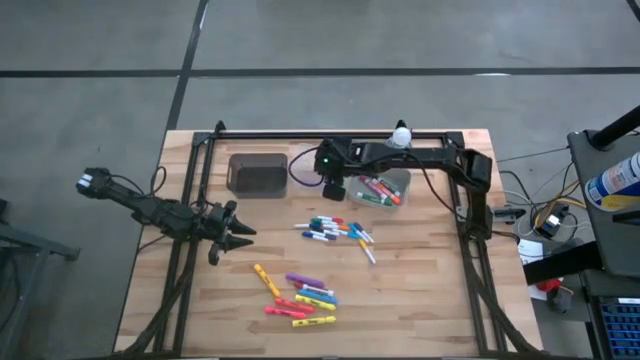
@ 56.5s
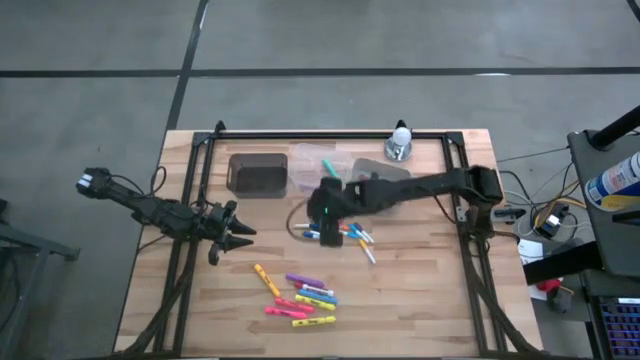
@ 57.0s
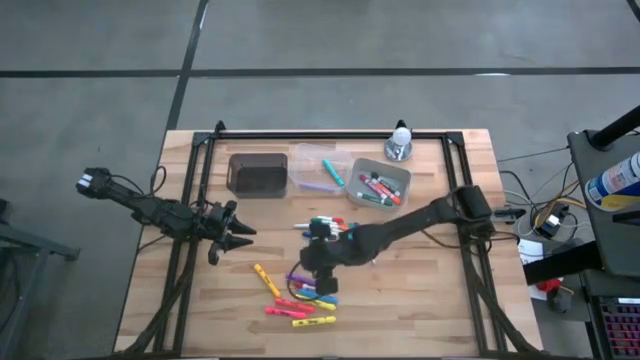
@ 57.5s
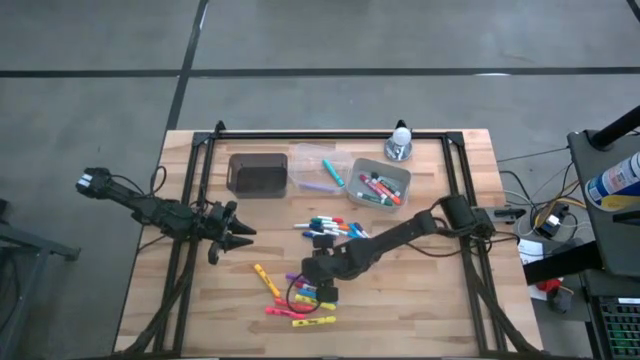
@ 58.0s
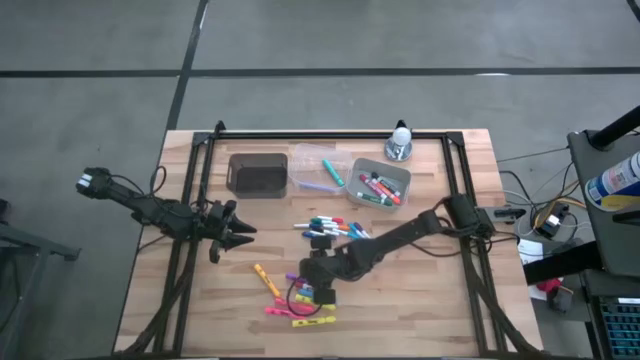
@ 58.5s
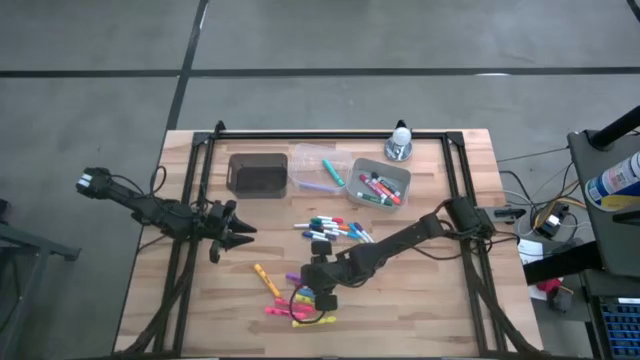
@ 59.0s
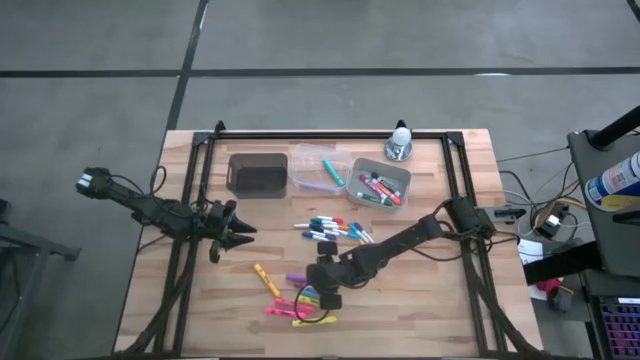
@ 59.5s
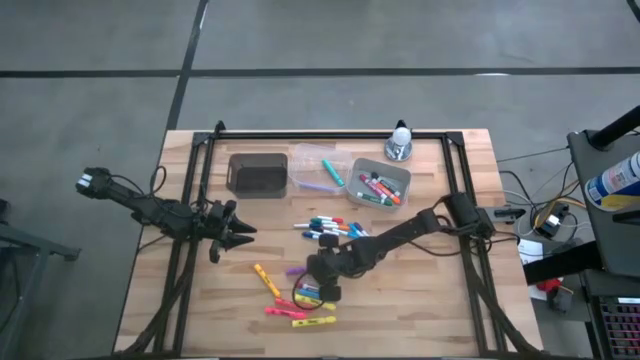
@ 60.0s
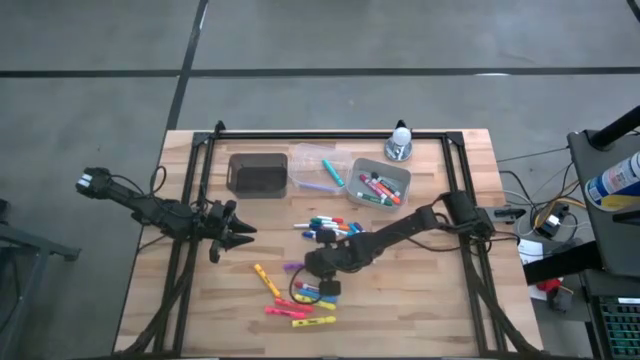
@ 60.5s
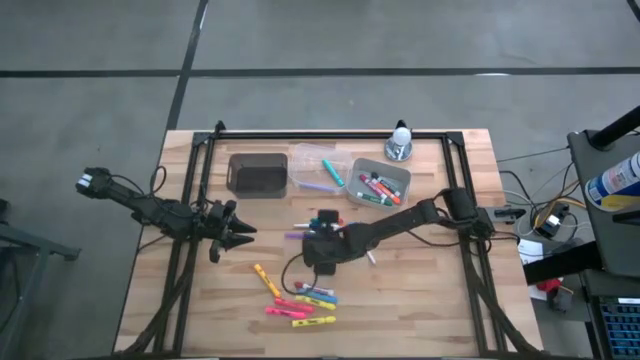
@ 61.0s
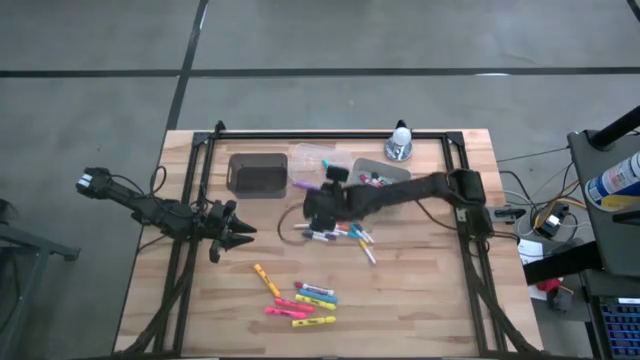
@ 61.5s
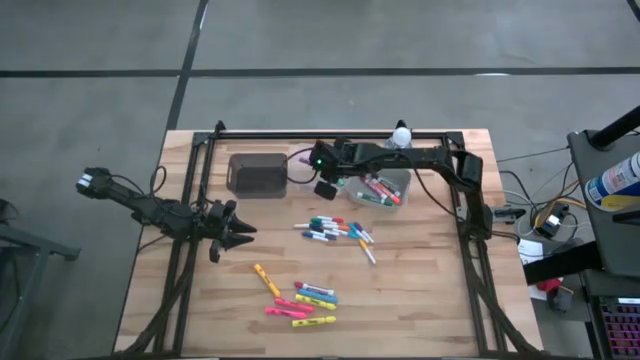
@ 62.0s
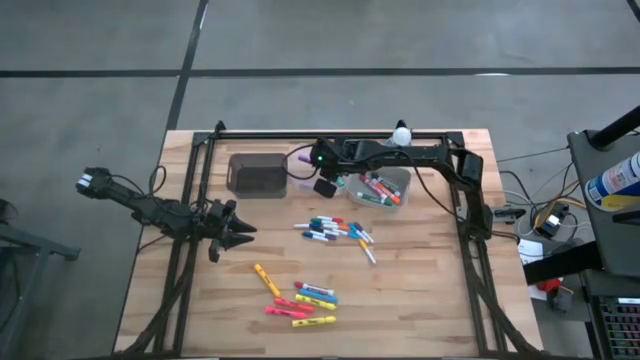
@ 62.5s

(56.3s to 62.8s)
Task: Pick & Place Markers
Put the violet highlighter into the transparent bin

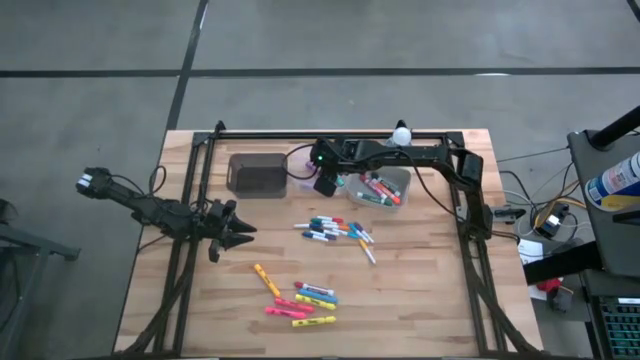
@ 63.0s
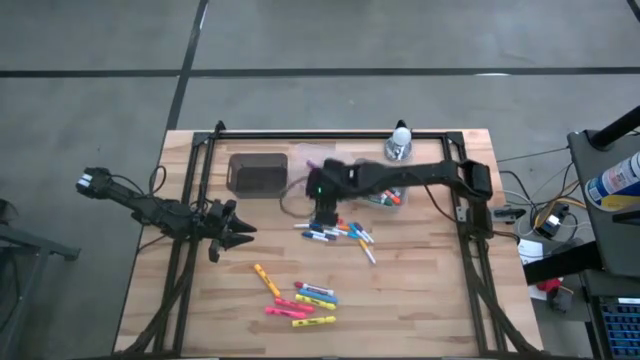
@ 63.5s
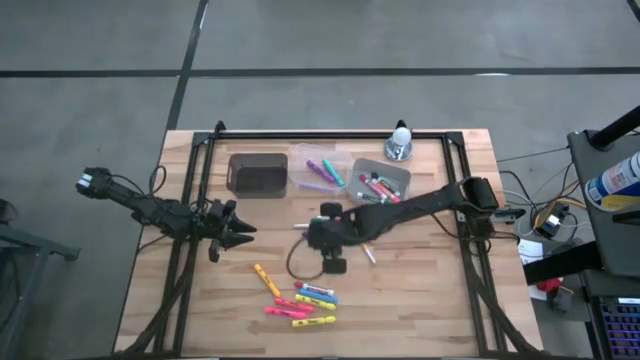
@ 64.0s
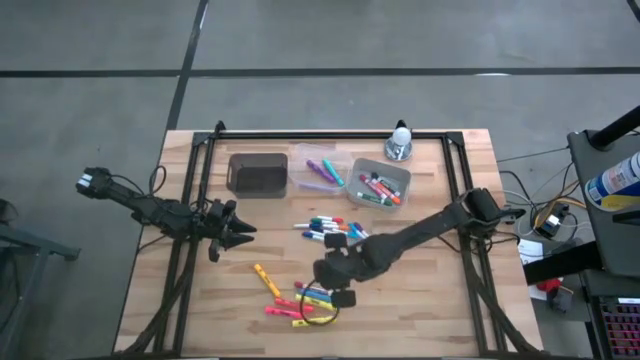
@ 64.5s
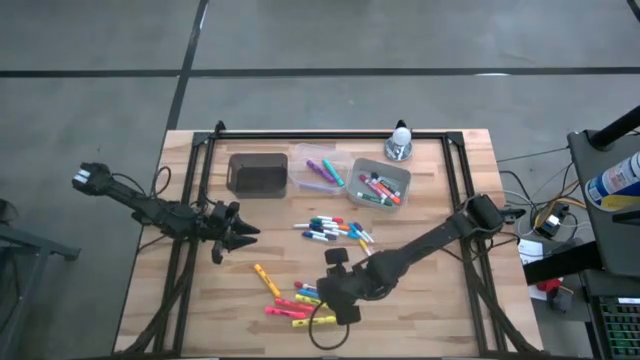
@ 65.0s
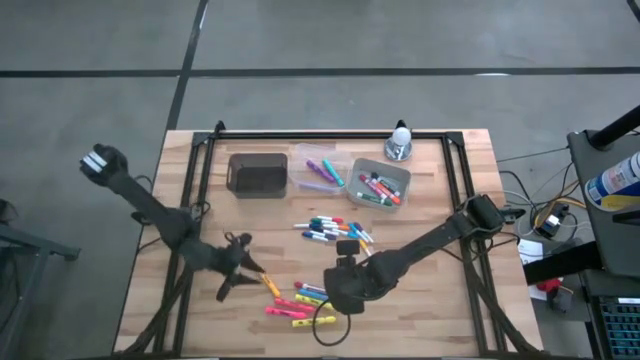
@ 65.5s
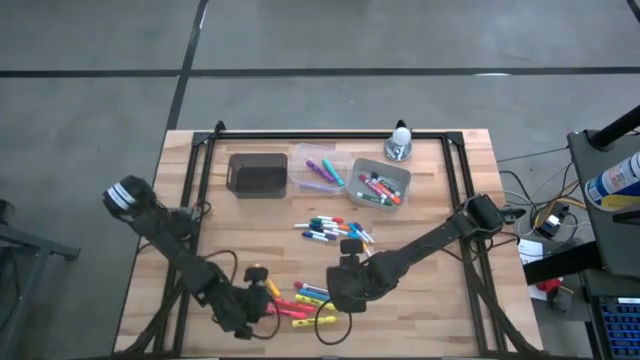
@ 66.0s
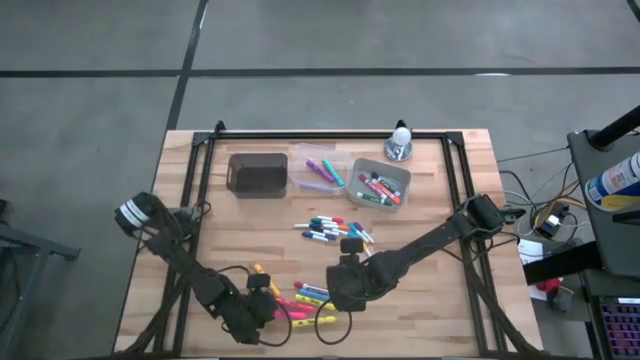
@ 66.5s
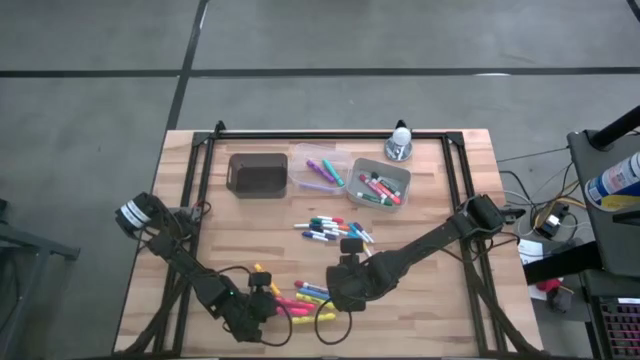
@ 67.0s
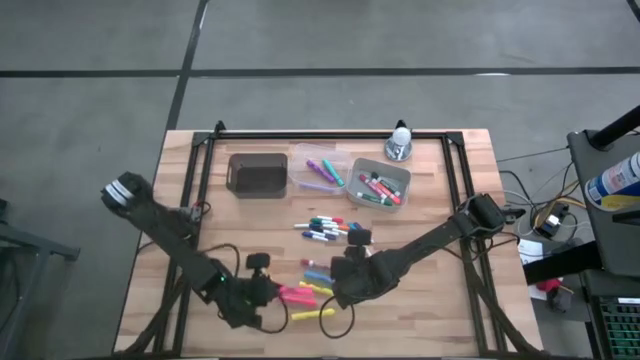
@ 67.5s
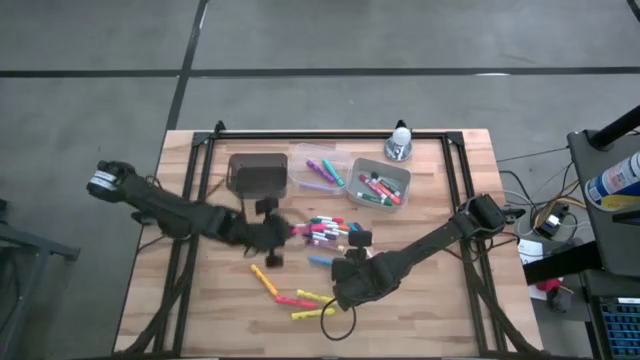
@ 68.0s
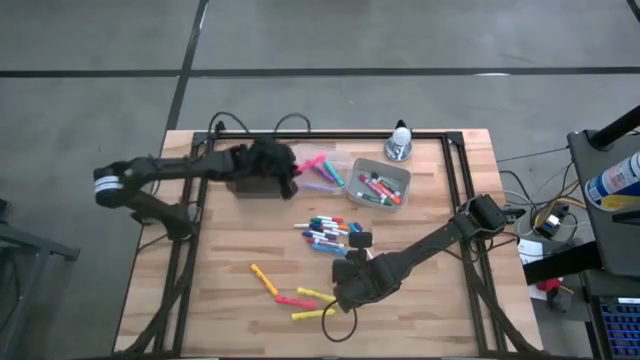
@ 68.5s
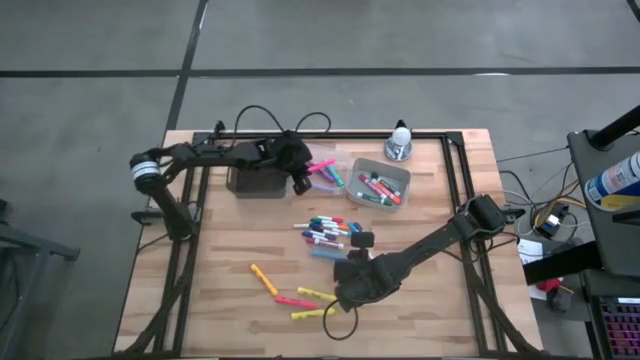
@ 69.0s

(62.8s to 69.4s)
Put the pink highlighter into the transparent bin

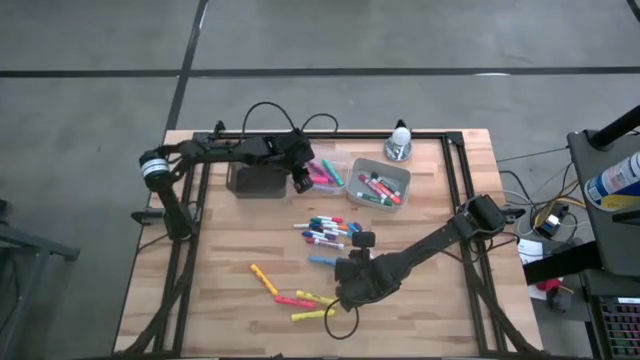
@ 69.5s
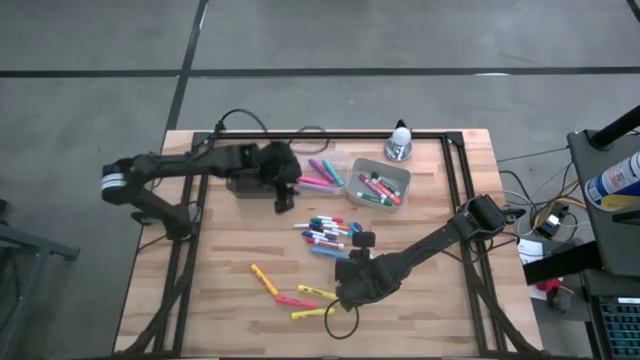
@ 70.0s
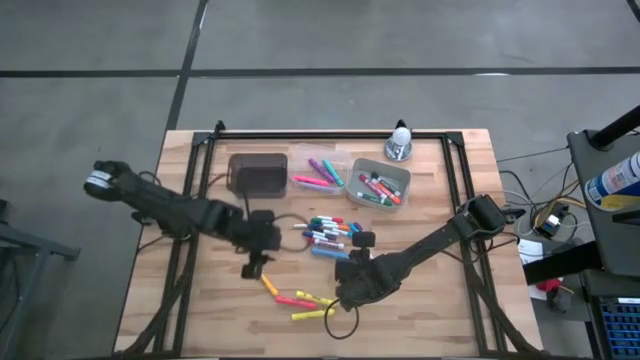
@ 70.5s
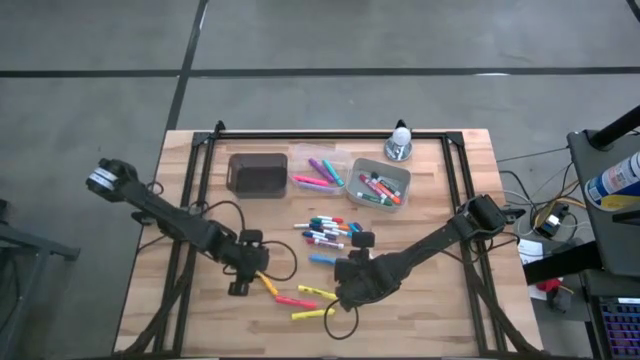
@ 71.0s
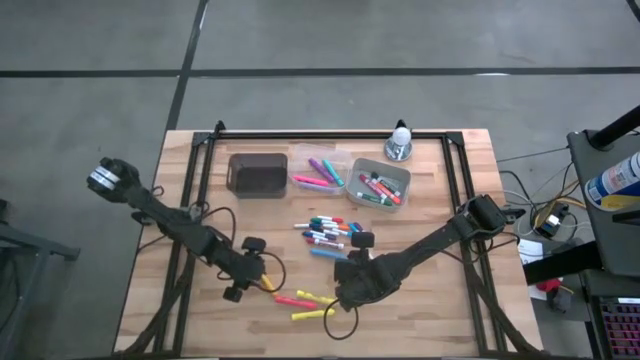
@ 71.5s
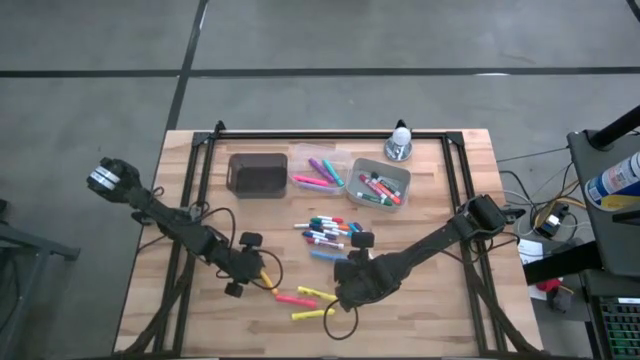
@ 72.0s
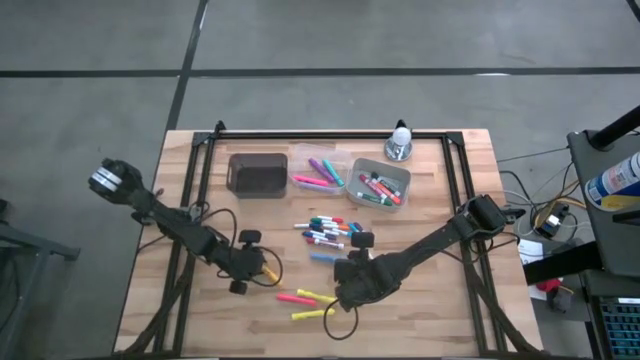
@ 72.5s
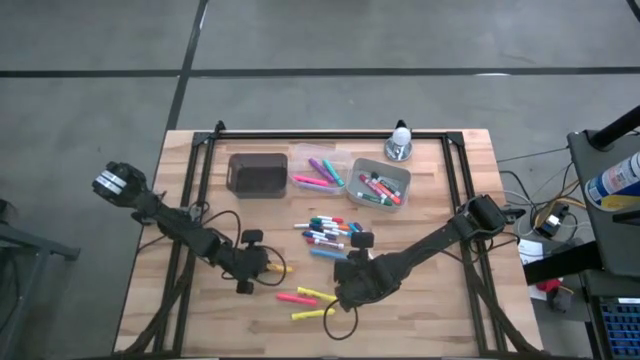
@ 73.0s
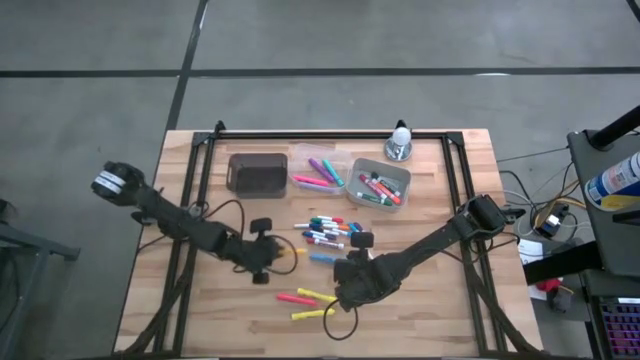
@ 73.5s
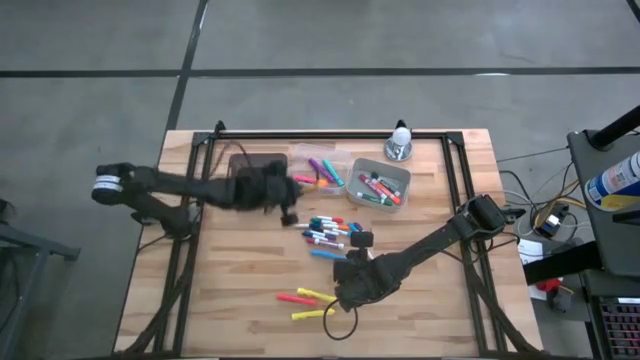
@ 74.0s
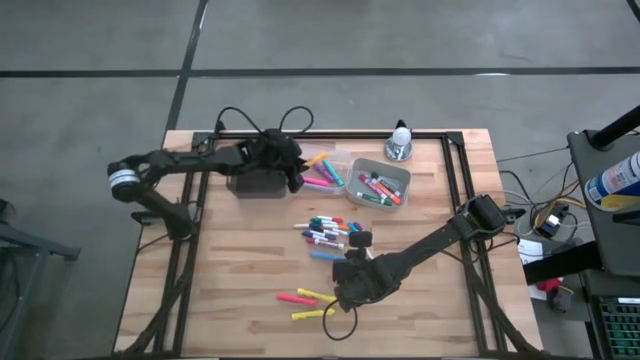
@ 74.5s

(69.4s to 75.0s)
Put the yellow highlighter into the transparent bin

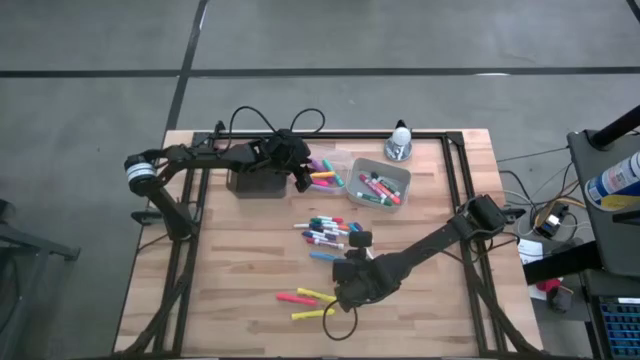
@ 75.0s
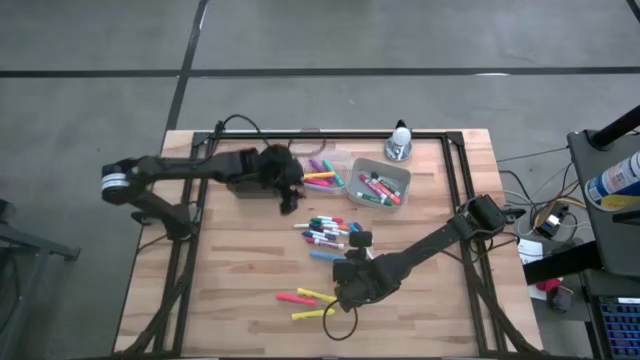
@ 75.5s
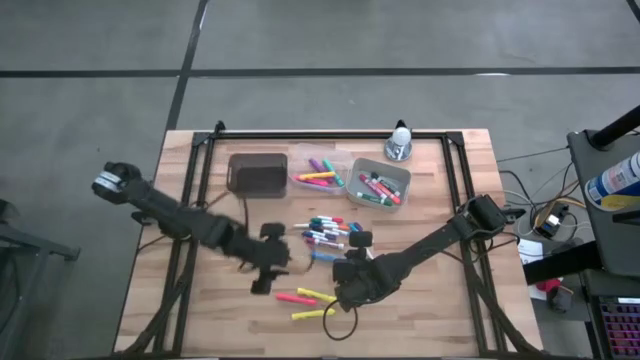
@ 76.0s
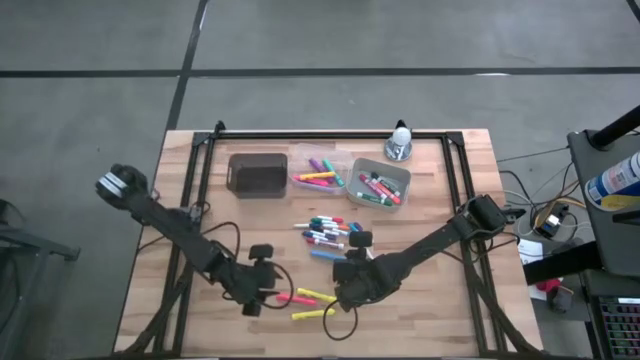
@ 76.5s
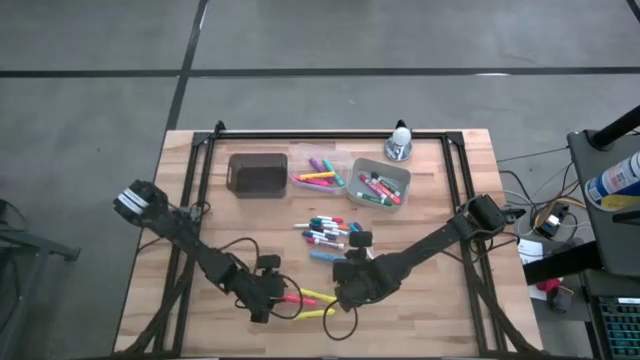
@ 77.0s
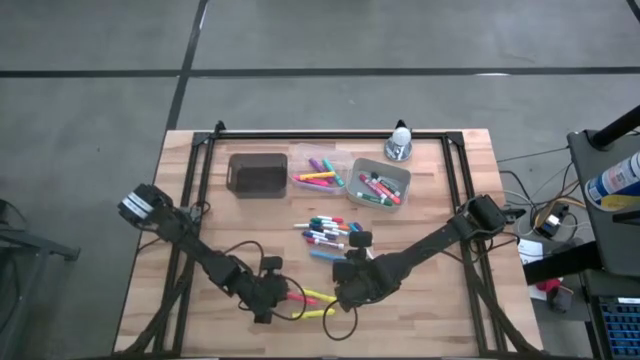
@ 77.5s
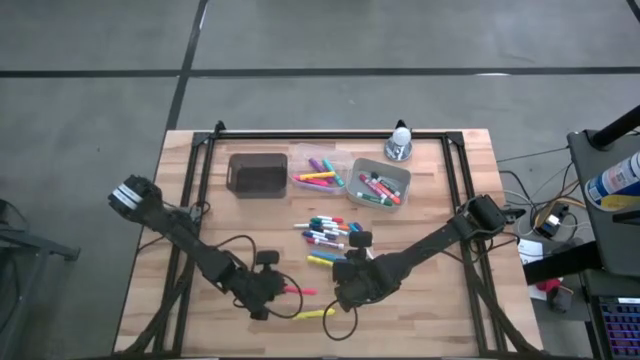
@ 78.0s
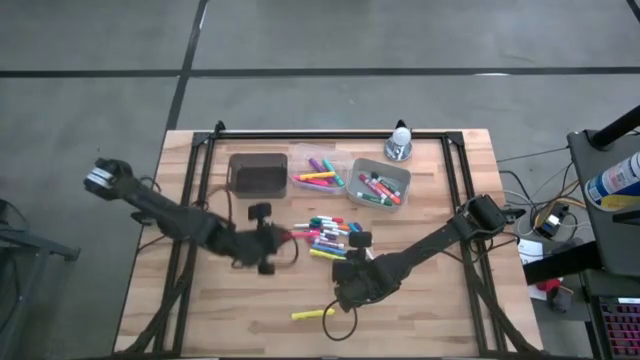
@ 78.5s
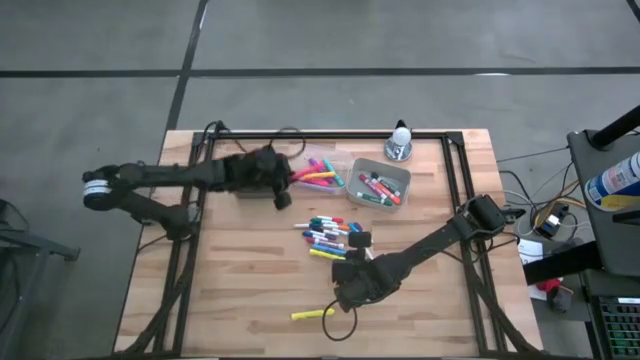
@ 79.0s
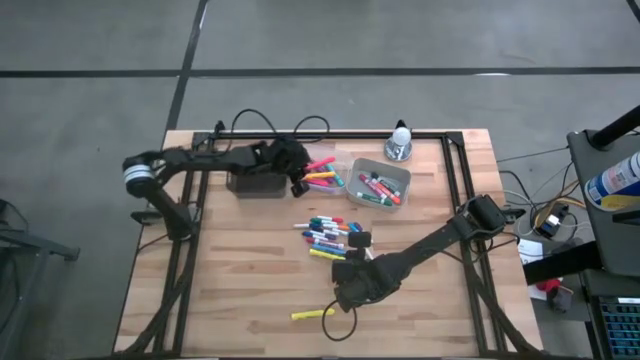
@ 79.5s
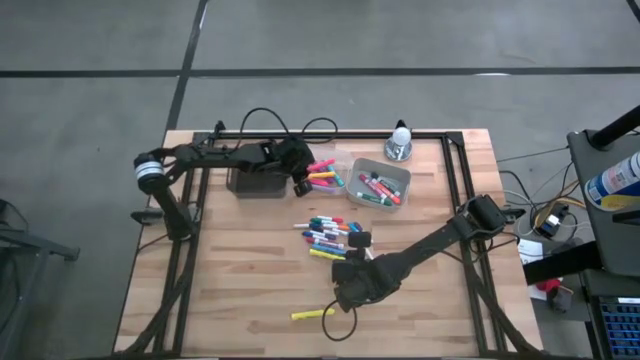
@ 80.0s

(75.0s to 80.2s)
Put the orange highlighter into the transparent bin
